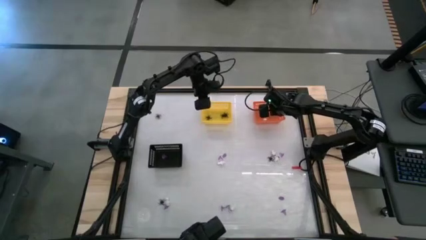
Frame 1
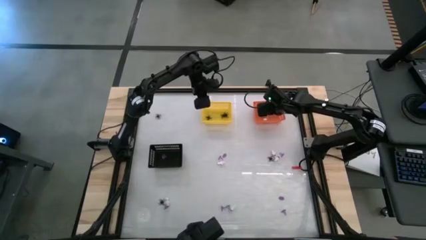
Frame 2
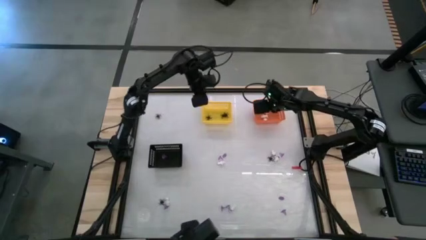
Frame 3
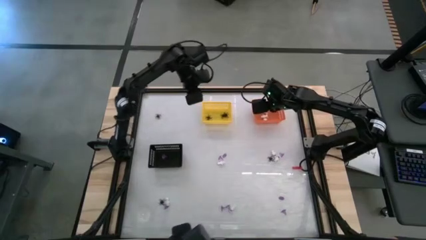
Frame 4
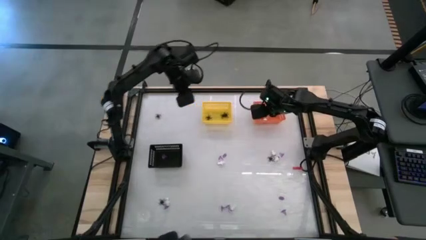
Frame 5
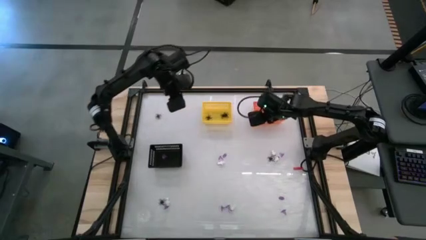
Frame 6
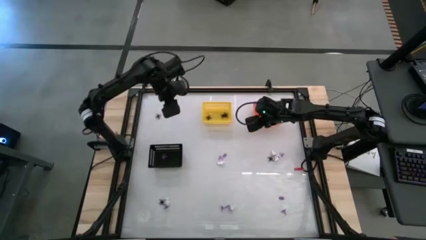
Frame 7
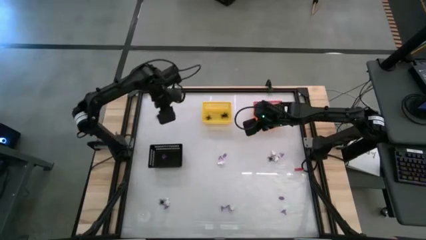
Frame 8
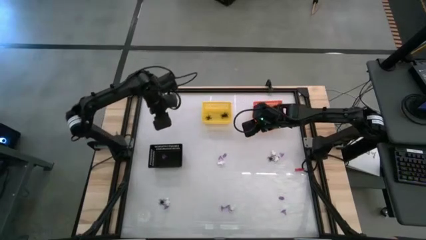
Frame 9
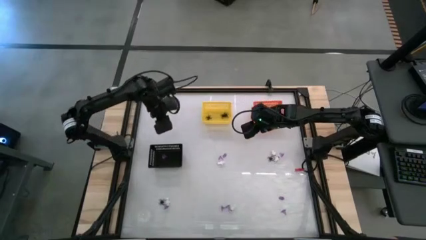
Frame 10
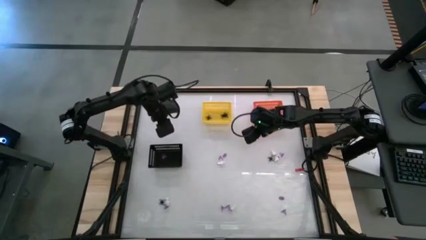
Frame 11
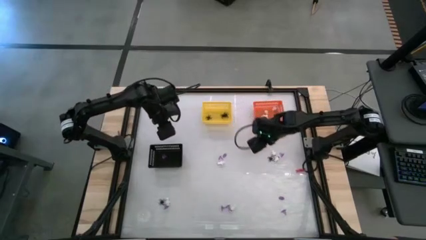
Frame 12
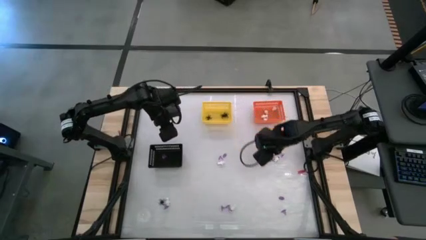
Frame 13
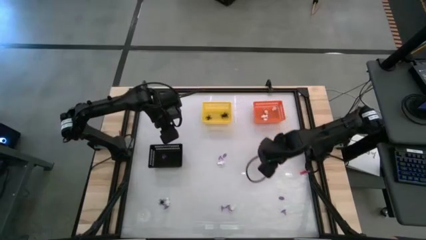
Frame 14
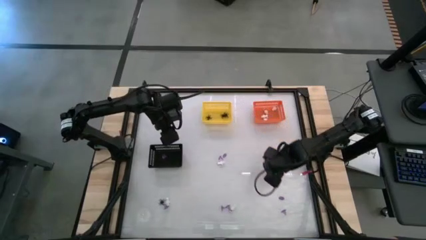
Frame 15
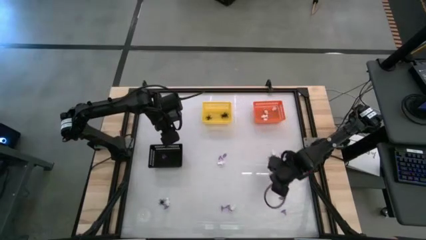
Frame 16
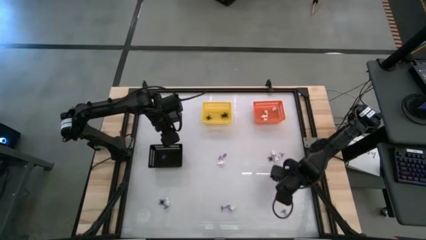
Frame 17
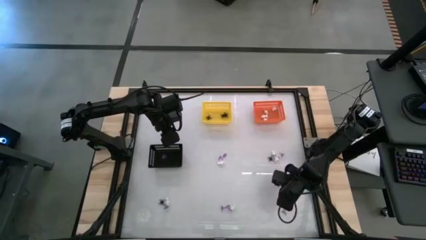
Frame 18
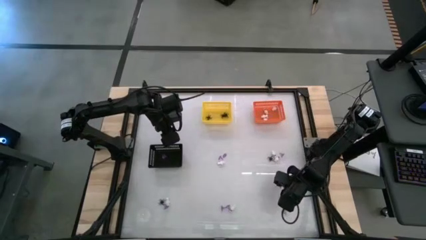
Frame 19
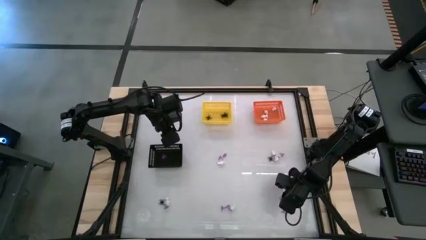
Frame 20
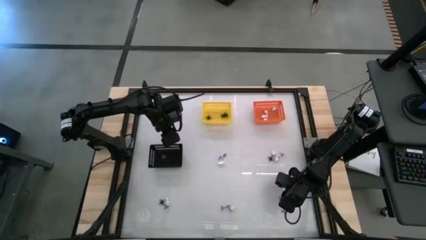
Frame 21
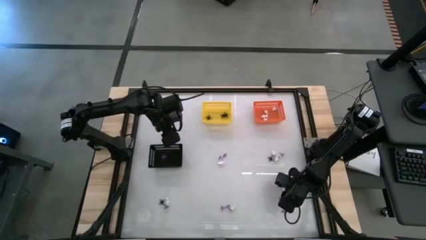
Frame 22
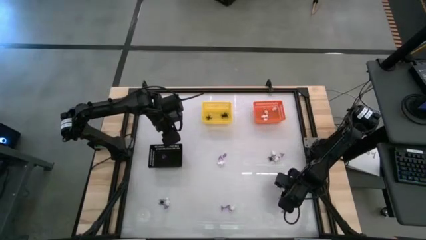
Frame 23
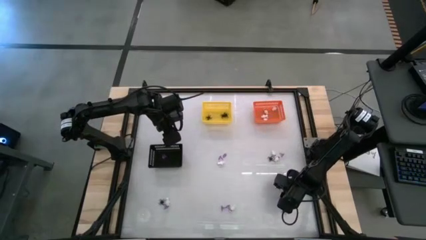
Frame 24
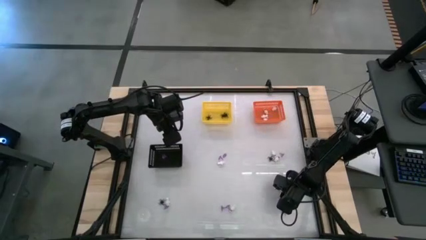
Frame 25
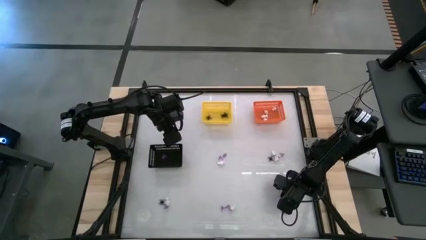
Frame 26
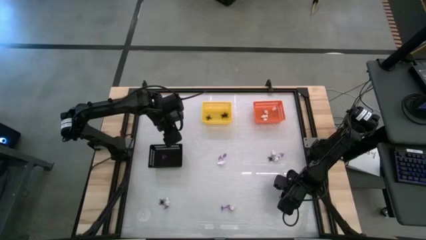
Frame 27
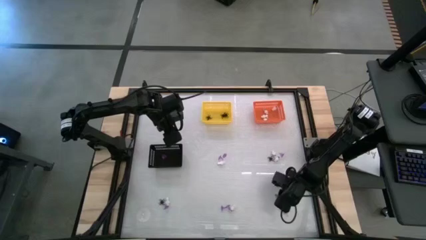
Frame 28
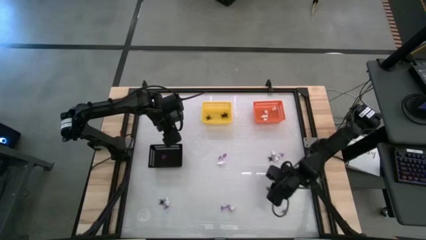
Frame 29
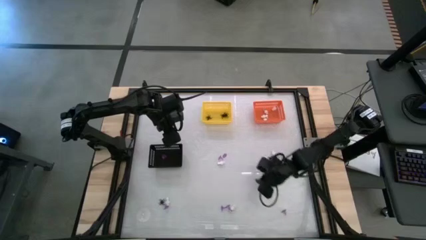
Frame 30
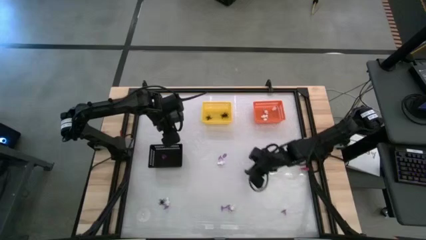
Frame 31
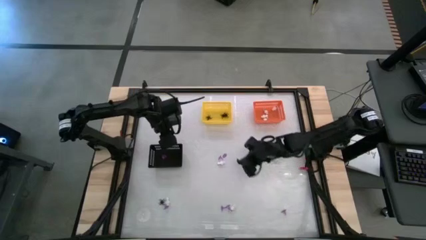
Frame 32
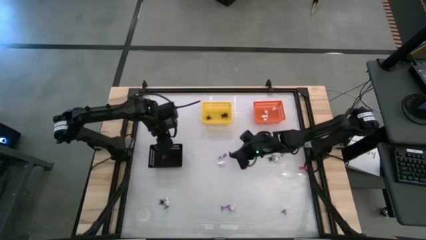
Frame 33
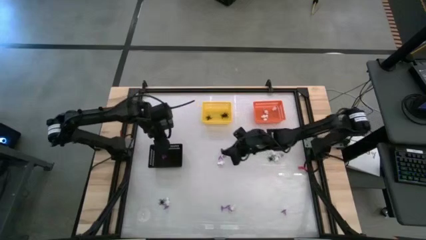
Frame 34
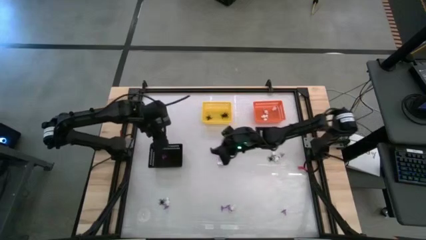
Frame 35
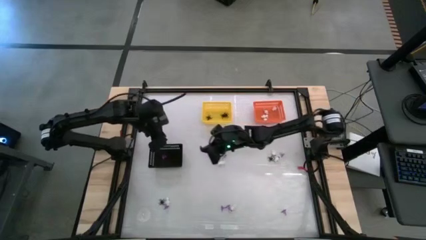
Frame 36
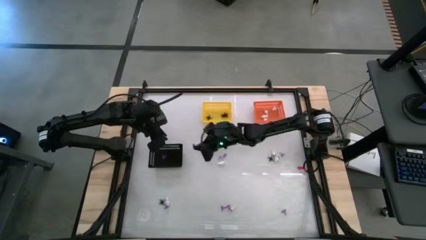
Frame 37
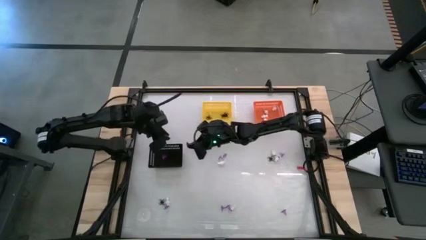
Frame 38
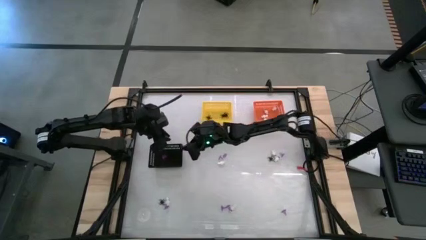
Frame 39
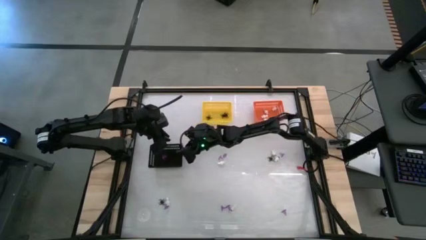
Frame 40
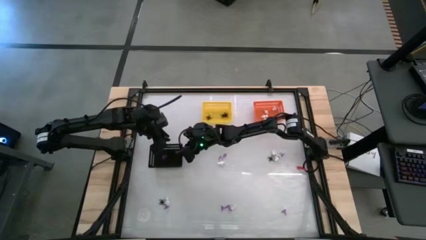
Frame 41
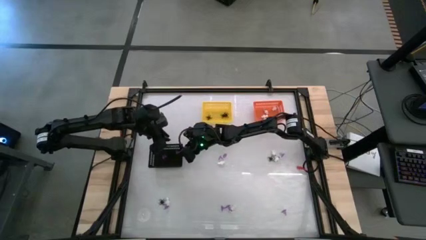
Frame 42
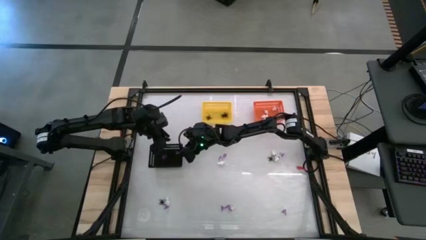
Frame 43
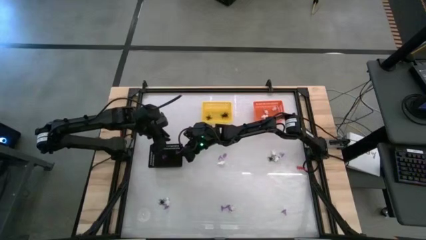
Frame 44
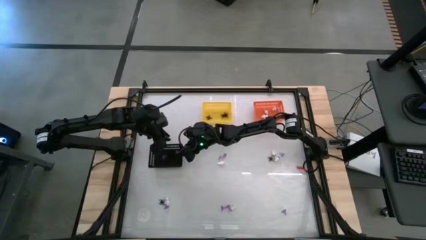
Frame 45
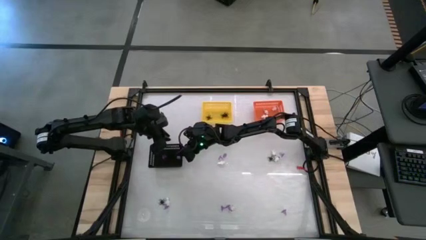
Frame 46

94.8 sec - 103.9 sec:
Task: Sort Halloween decoration
Put the purple hat toy into the black basket

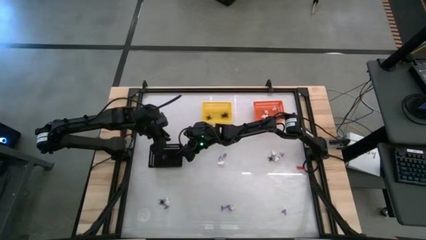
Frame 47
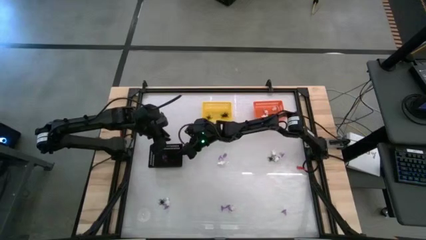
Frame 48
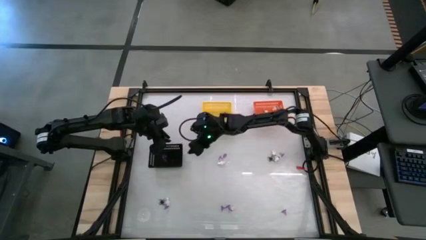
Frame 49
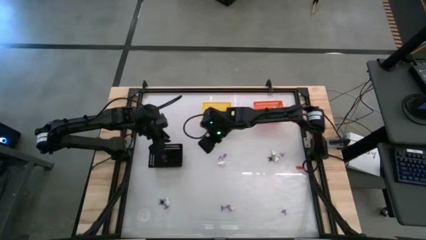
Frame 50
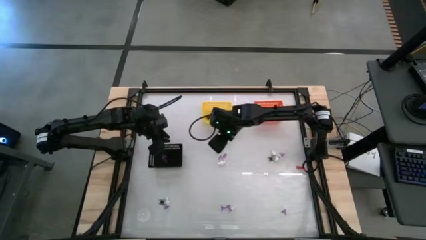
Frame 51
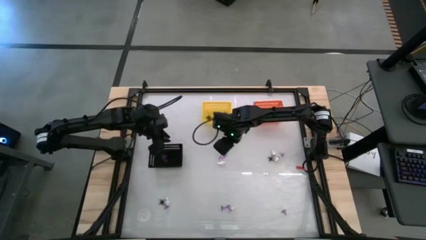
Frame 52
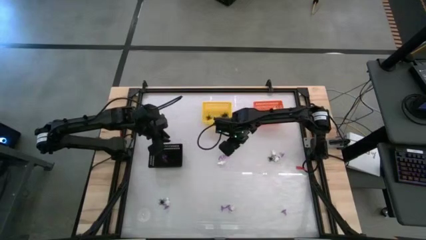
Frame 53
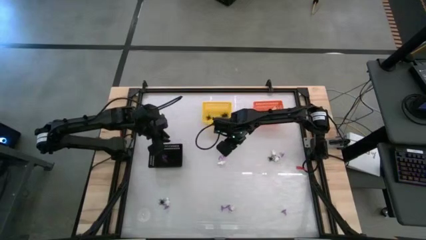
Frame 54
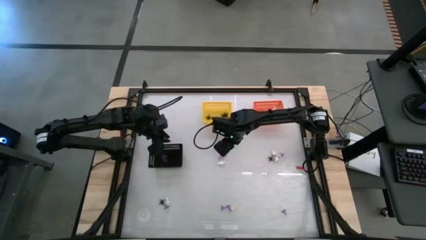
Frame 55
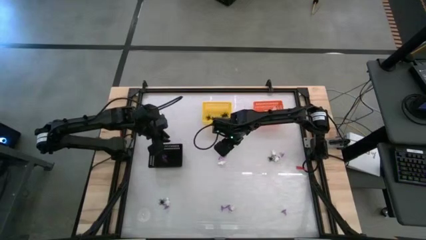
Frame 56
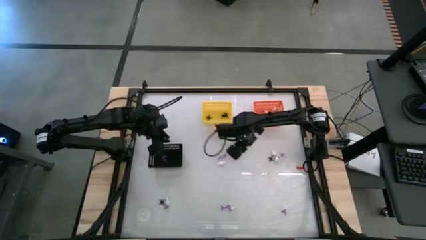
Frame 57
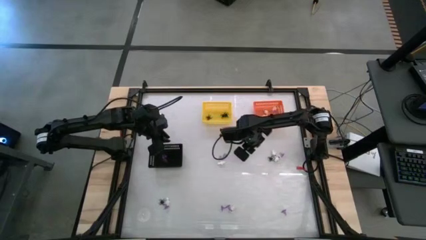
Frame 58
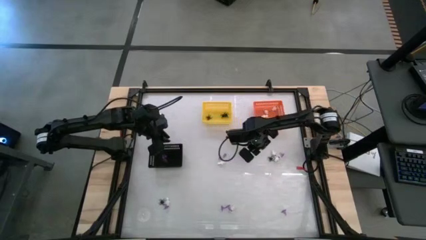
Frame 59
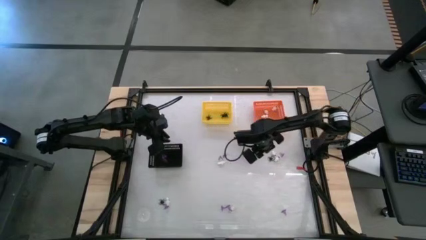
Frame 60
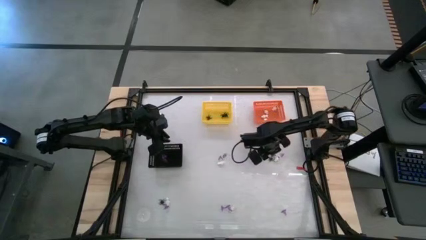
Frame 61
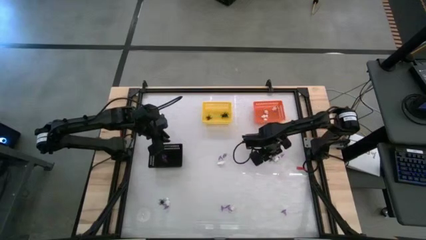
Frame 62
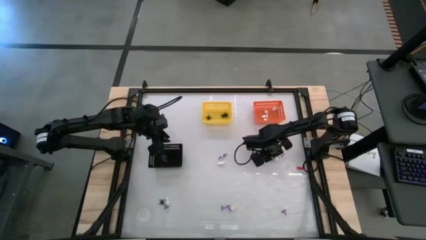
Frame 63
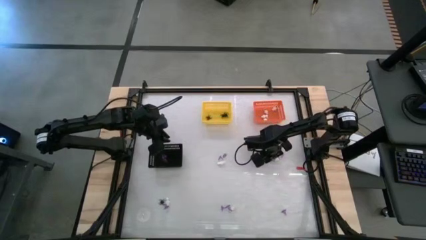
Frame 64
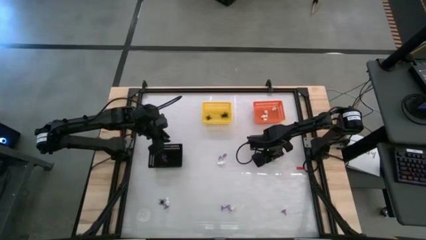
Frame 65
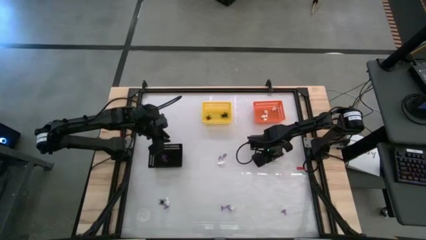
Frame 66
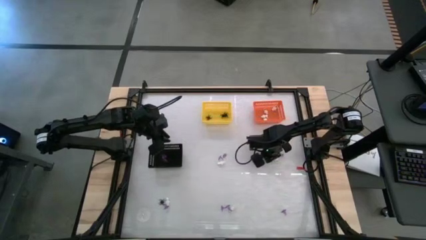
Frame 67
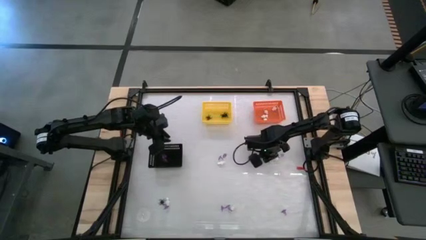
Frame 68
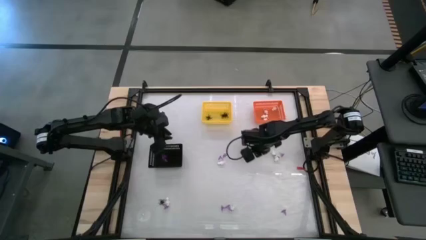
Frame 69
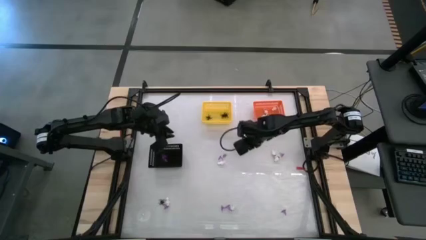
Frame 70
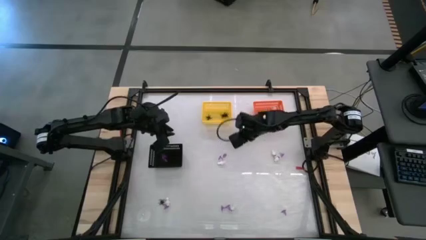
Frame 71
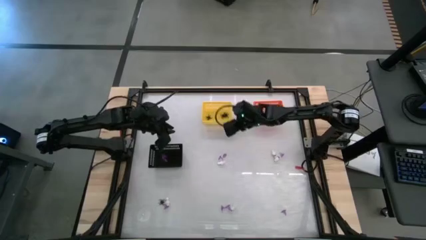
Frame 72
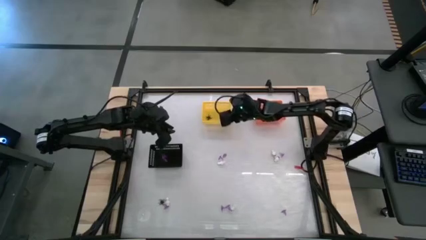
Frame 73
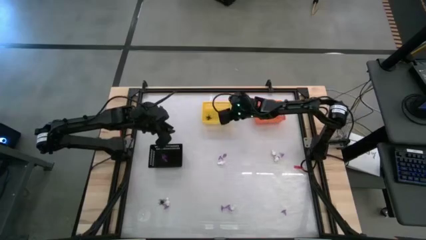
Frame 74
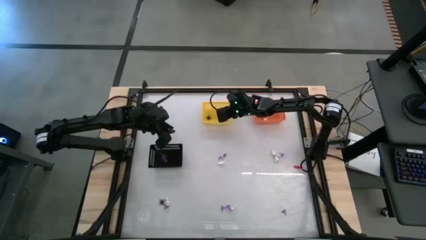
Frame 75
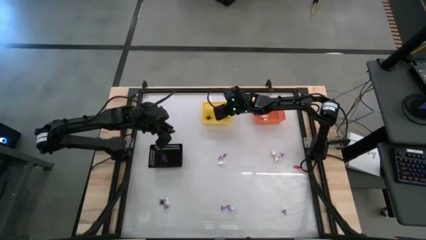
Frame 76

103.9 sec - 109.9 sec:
Put the black spider toy into the yellow basket
